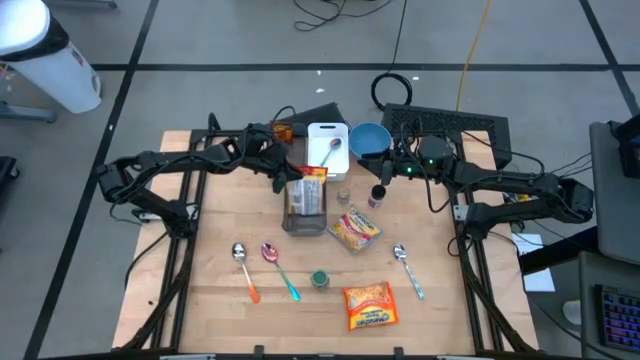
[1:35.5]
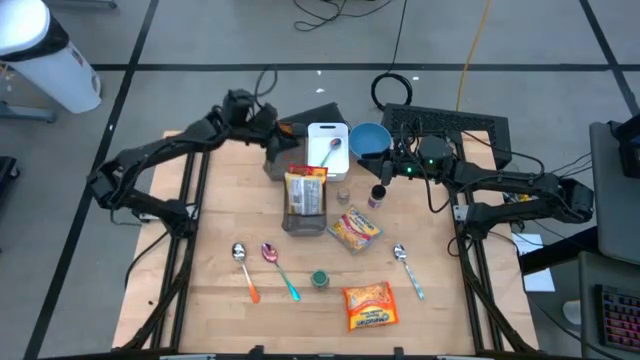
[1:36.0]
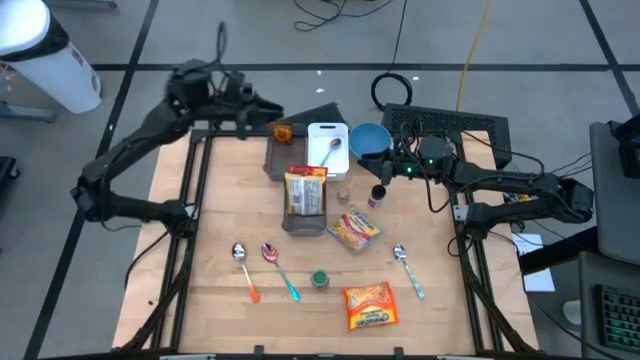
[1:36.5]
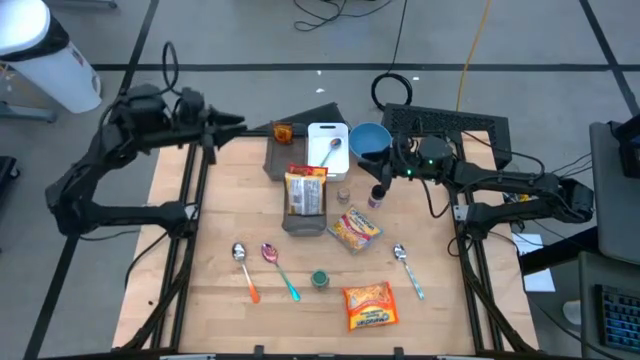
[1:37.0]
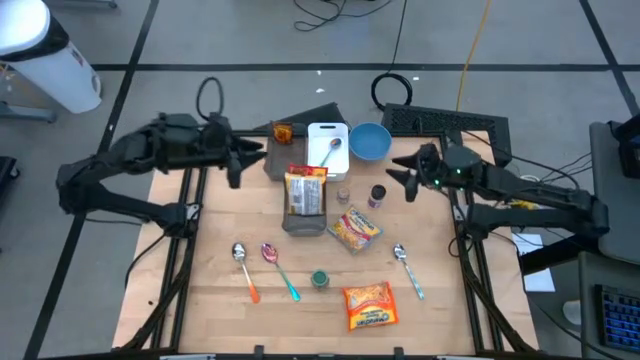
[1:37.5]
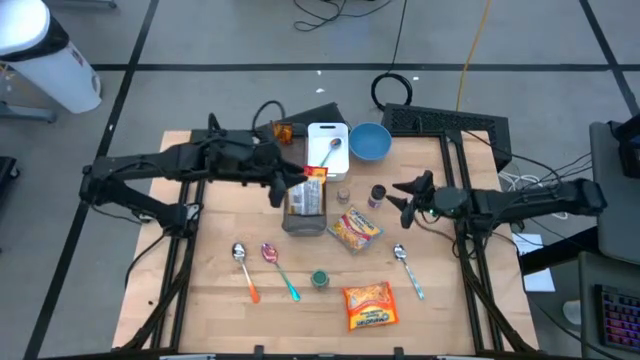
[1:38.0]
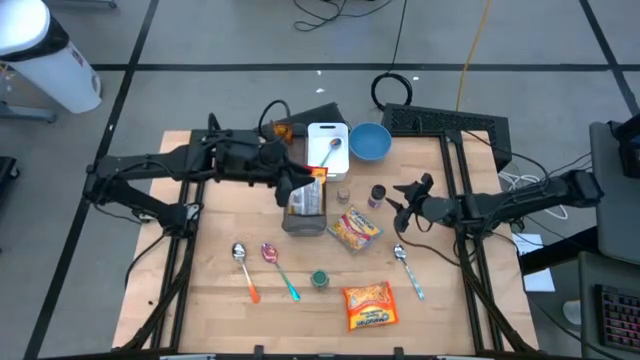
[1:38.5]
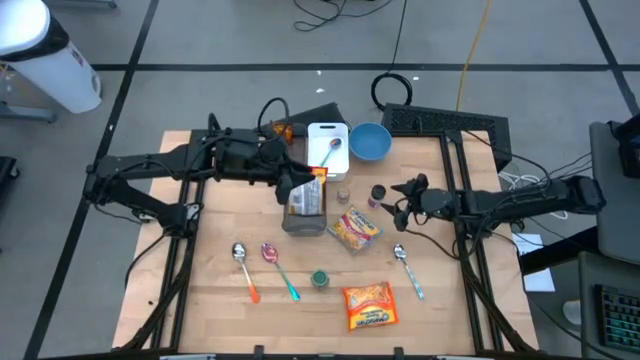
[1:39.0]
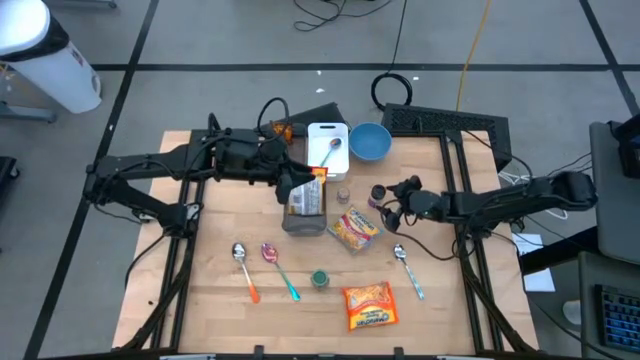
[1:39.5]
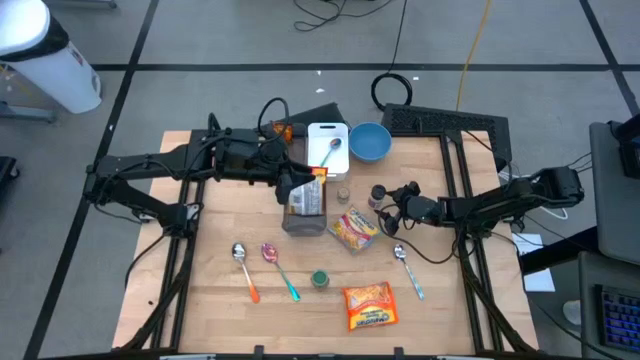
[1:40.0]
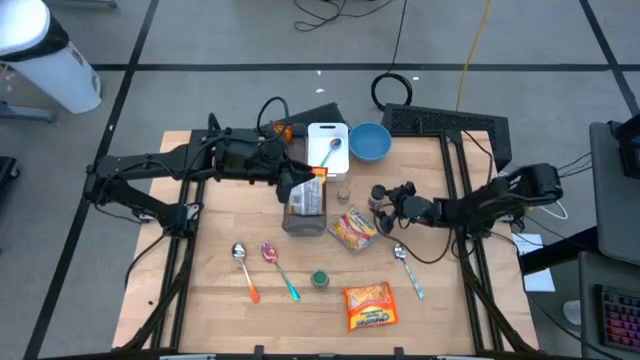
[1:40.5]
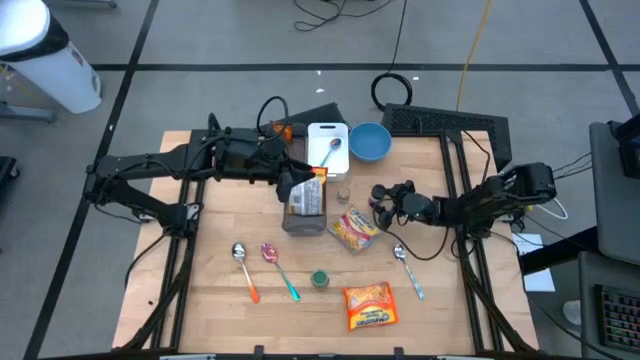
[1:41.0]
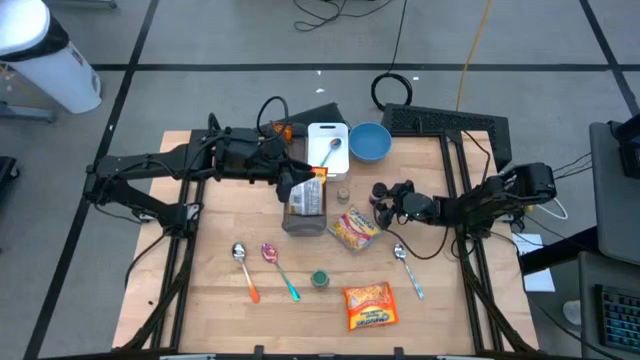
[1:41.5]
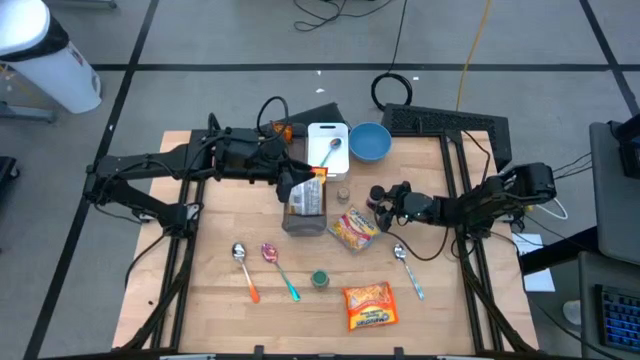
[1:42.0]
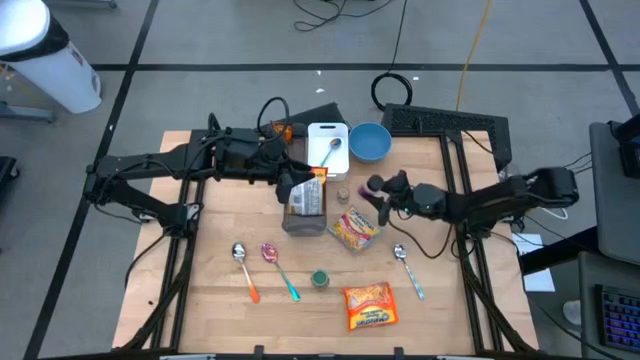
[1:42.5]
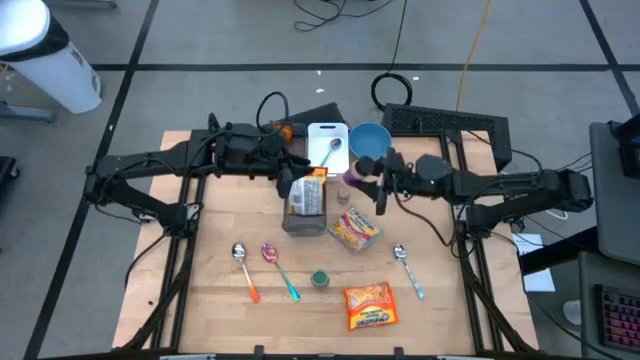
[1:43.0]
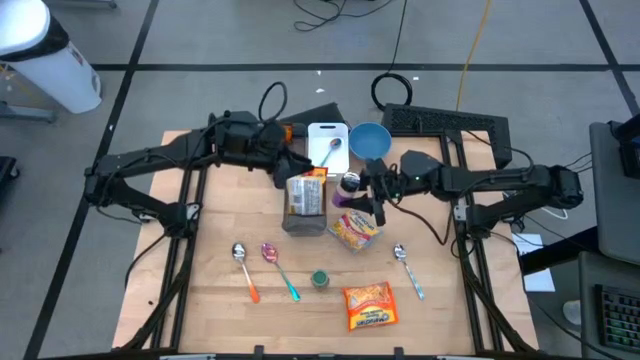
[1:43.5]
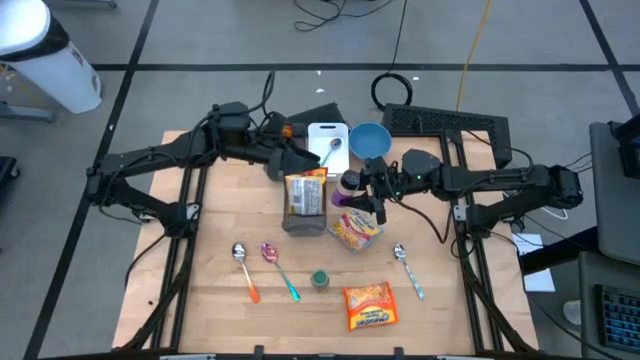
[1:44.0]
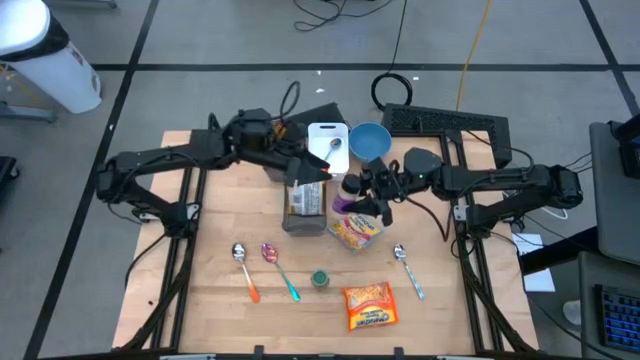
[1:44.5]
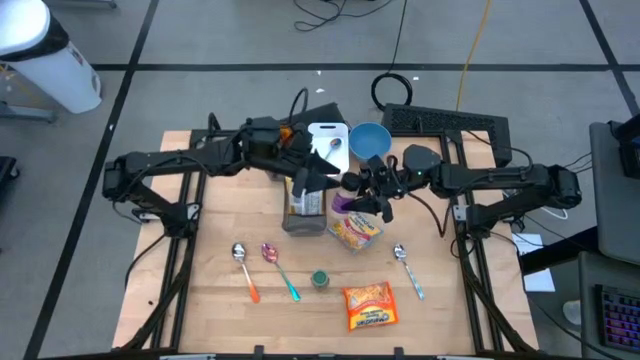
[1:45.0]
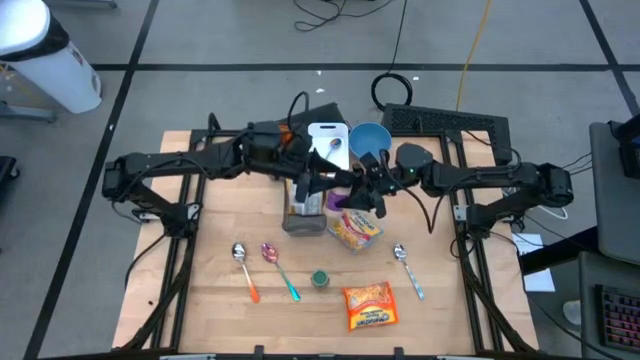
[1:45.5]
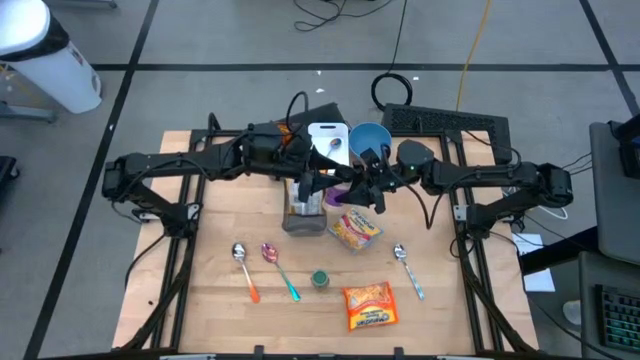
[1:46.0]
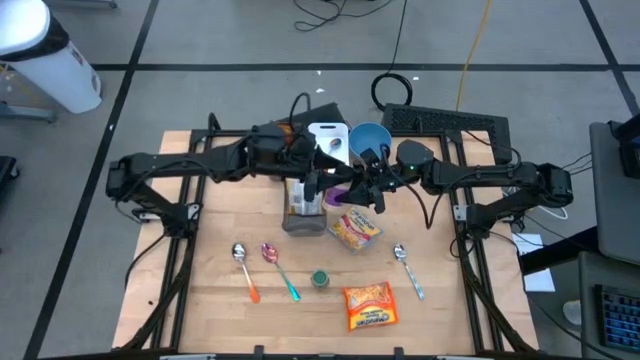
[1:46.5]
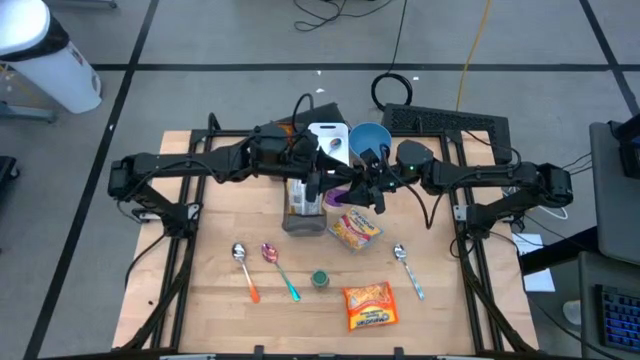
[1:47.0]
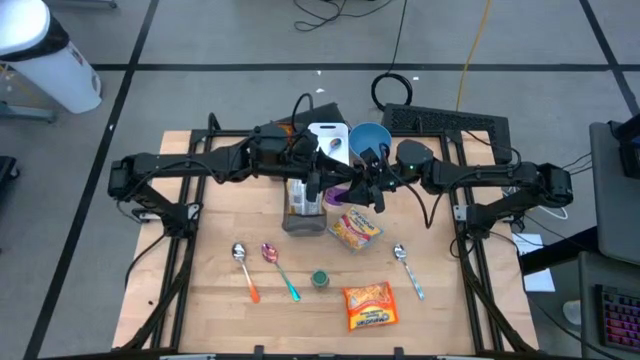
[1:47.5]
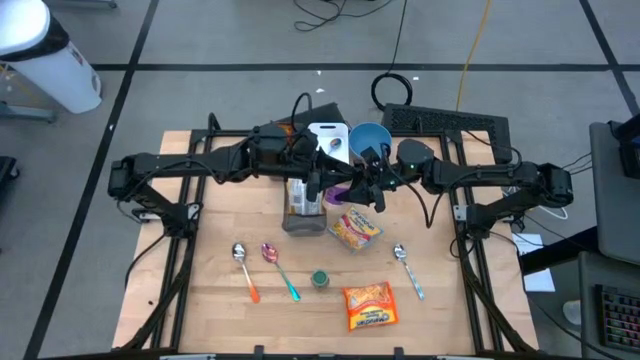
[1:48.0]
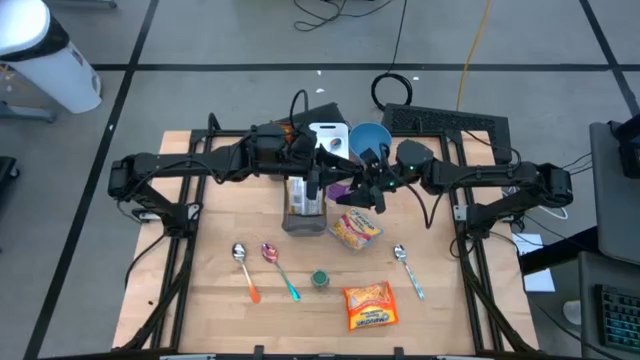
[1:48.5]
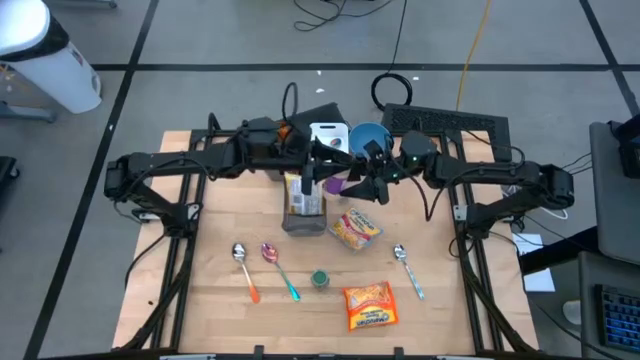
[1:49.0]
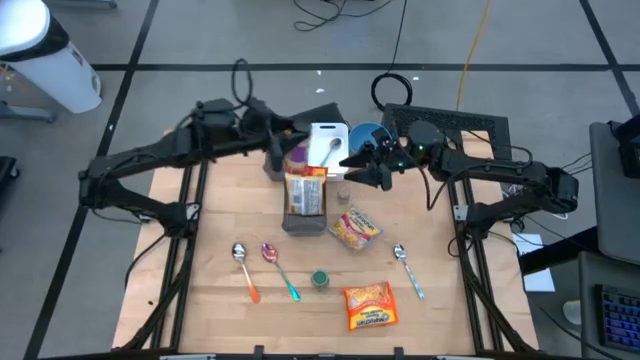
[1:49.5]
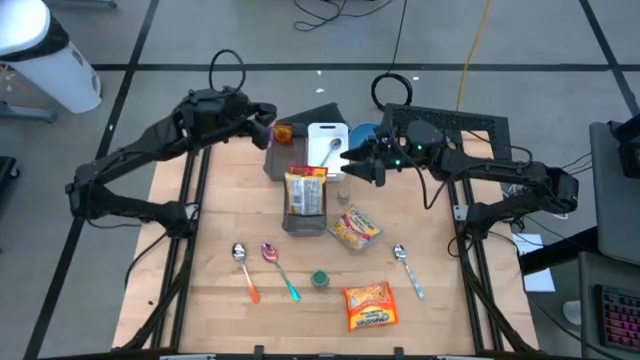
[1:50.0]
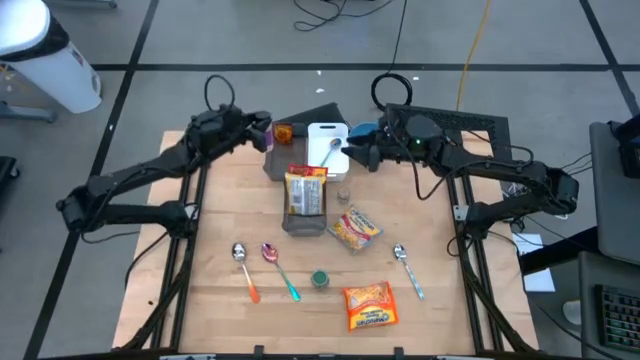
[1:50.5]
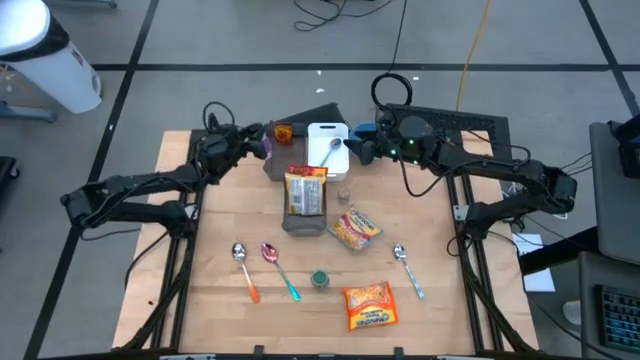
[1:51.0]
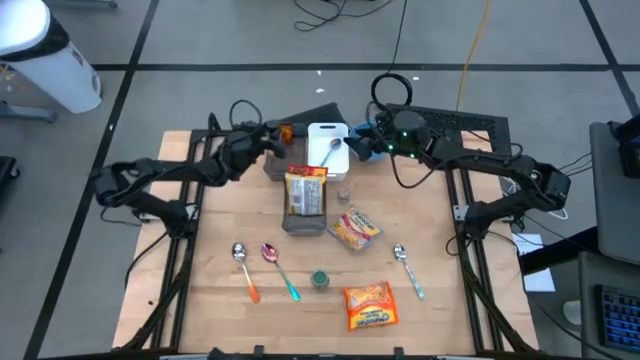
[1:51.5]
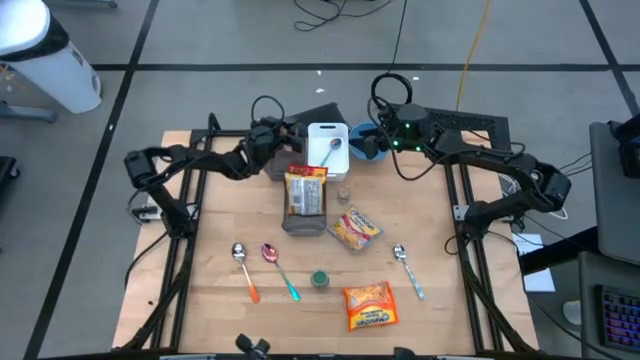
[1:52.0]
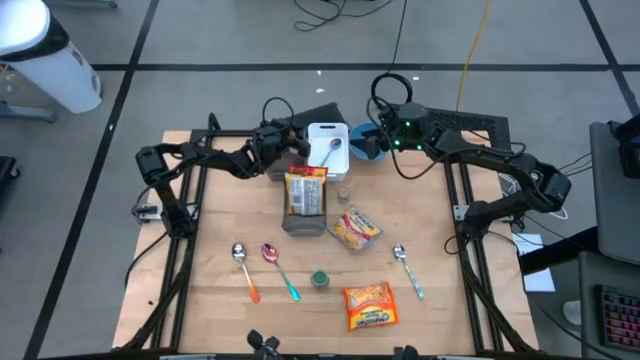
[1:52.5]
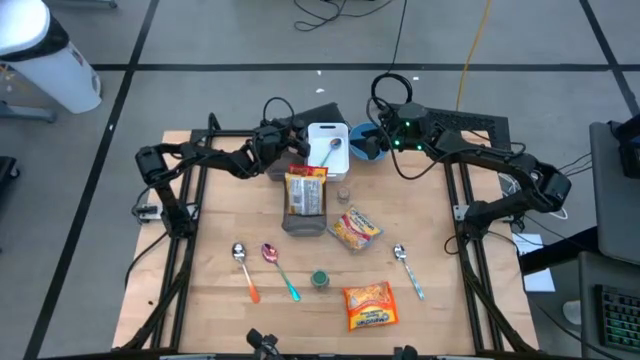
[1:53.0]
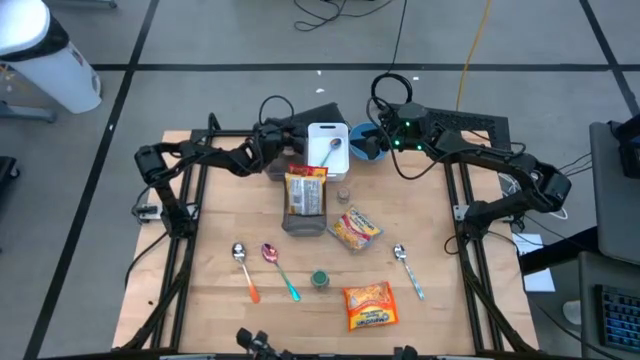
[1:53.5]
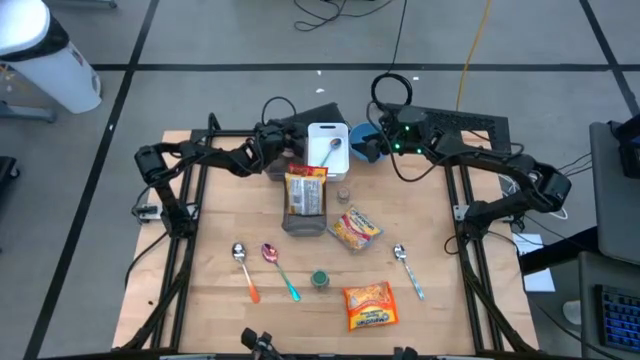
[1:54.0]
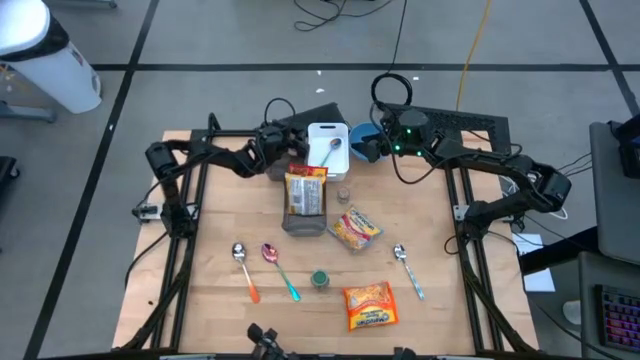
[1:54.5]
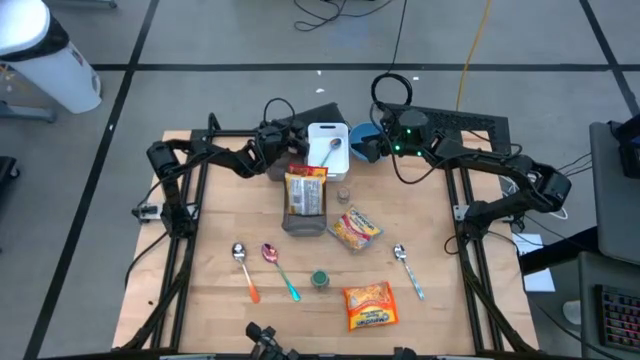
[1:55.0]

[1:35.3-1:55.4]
Task: Pick & Place Food Item
Put the violet spice bottle into the top black bin
